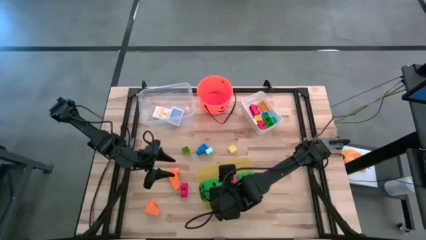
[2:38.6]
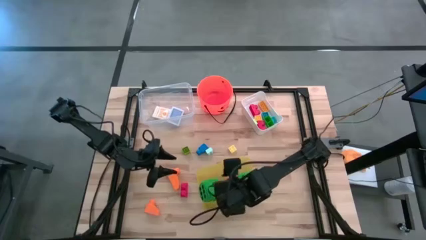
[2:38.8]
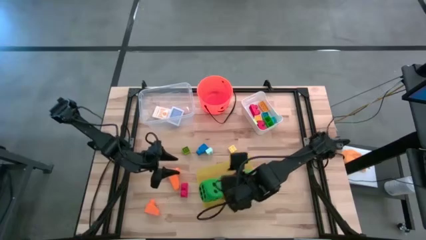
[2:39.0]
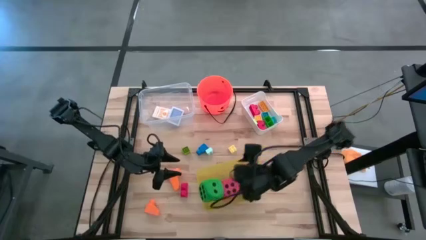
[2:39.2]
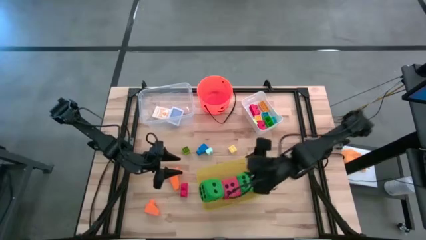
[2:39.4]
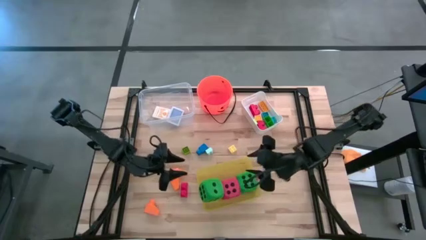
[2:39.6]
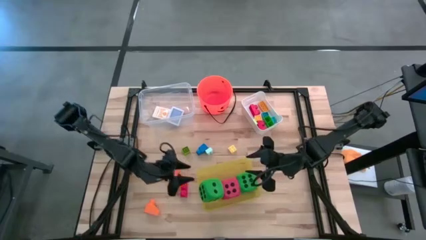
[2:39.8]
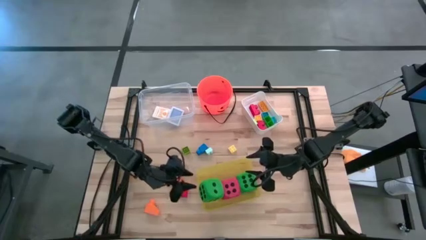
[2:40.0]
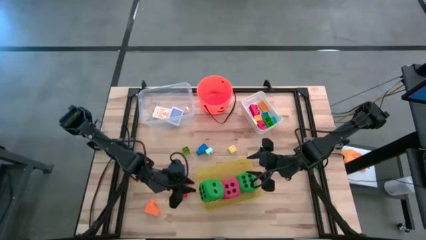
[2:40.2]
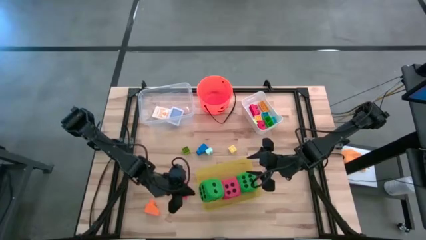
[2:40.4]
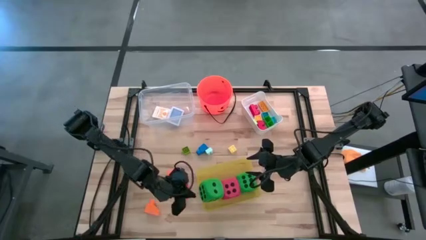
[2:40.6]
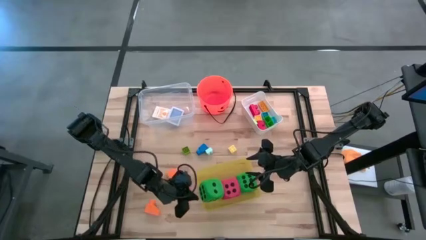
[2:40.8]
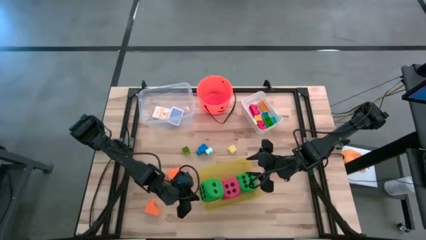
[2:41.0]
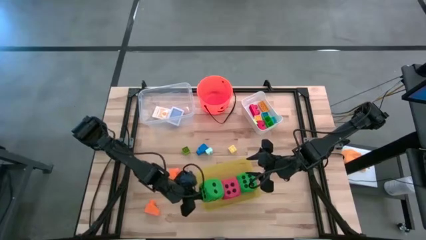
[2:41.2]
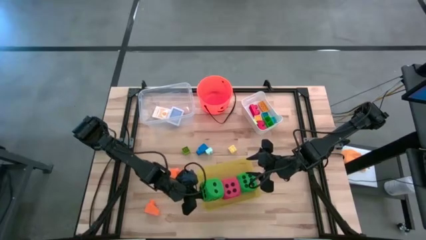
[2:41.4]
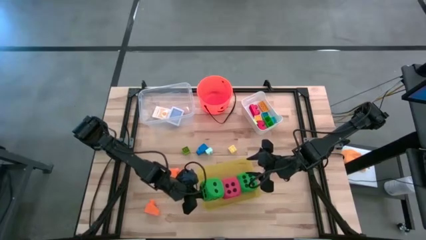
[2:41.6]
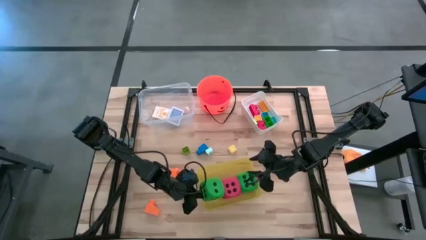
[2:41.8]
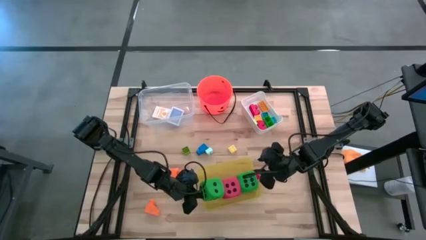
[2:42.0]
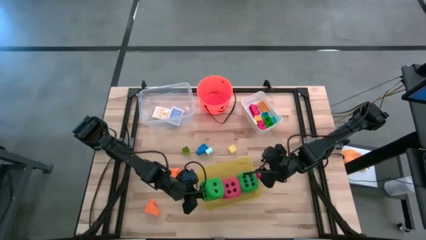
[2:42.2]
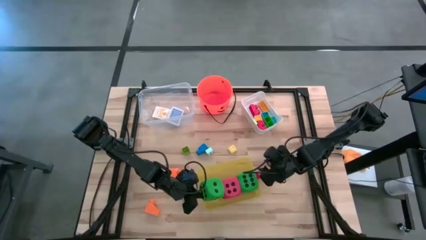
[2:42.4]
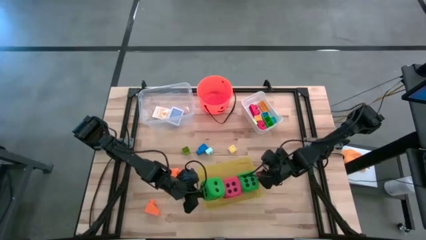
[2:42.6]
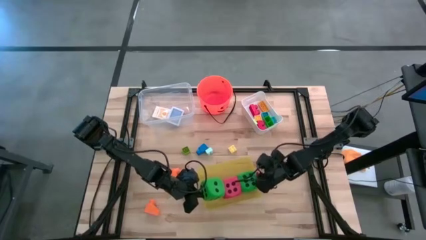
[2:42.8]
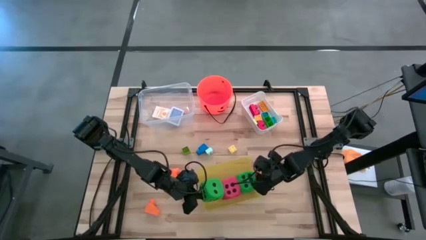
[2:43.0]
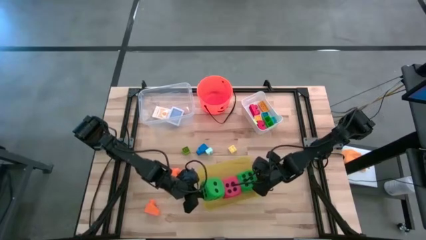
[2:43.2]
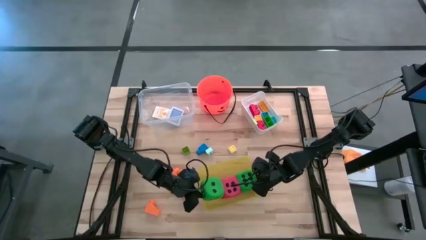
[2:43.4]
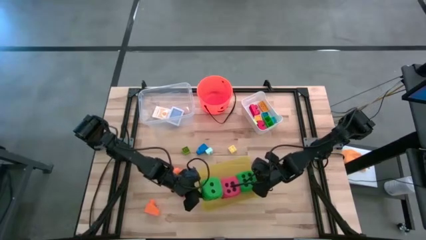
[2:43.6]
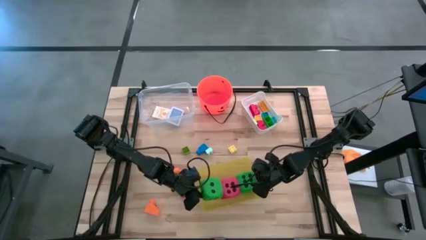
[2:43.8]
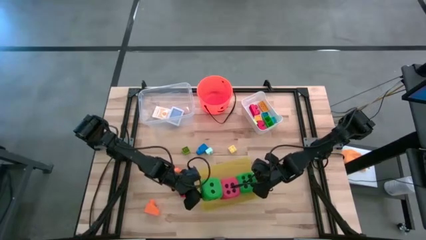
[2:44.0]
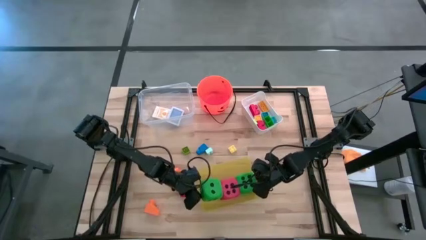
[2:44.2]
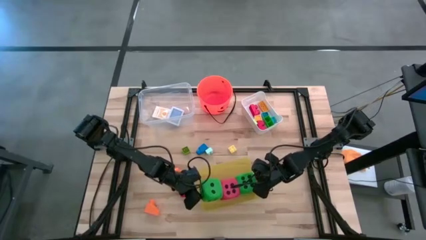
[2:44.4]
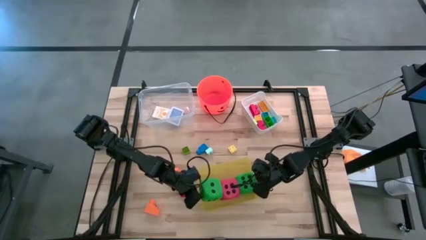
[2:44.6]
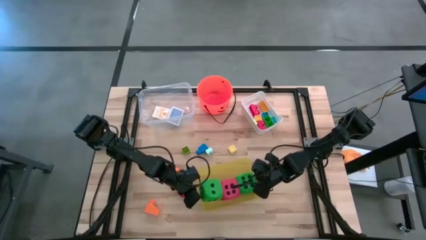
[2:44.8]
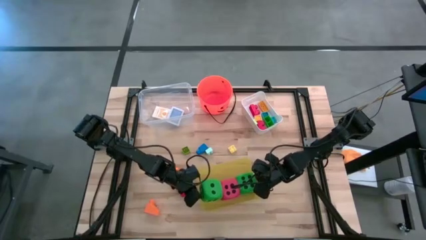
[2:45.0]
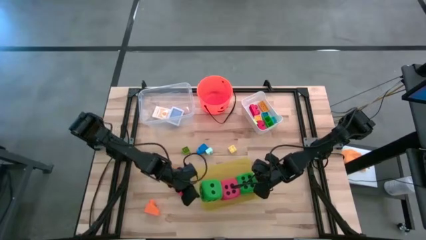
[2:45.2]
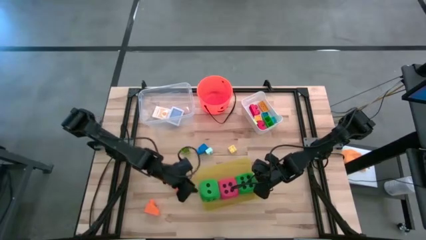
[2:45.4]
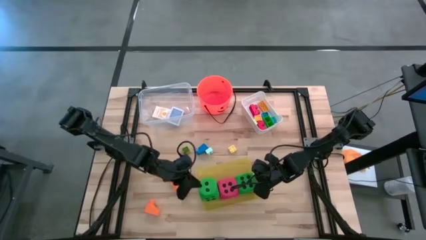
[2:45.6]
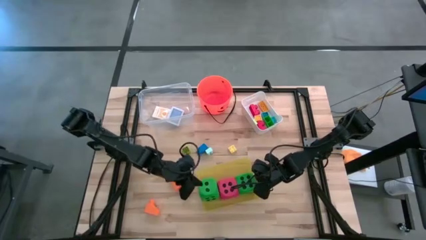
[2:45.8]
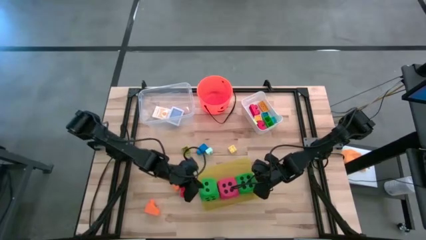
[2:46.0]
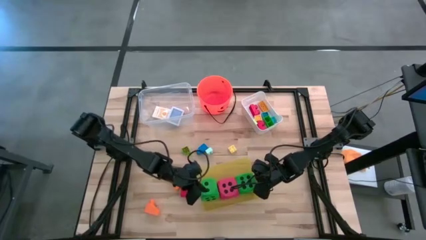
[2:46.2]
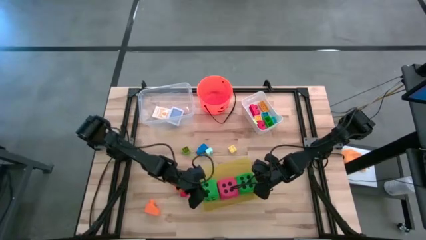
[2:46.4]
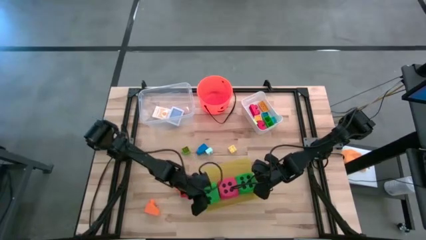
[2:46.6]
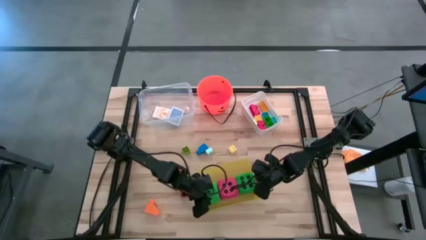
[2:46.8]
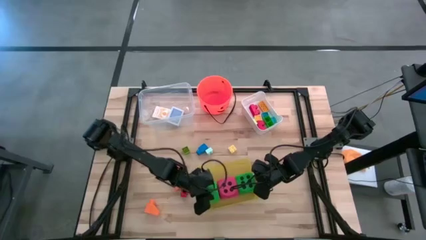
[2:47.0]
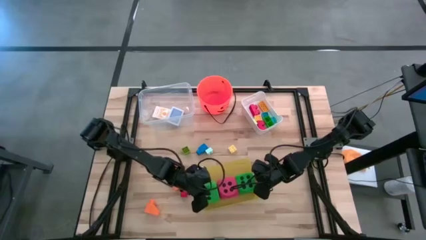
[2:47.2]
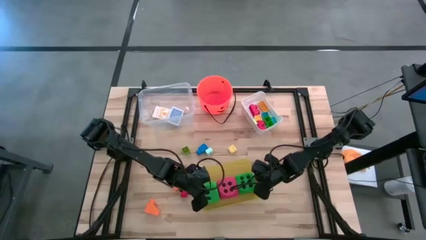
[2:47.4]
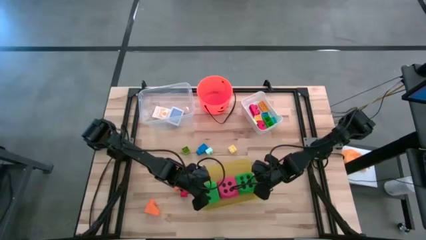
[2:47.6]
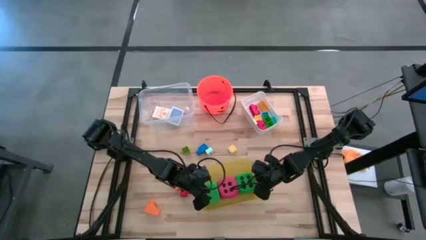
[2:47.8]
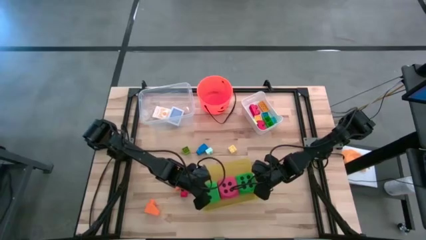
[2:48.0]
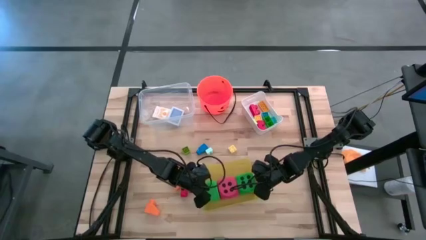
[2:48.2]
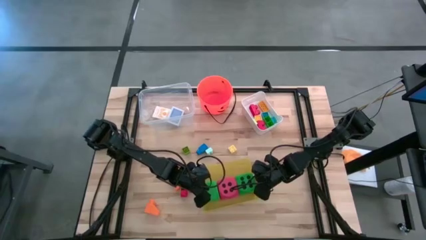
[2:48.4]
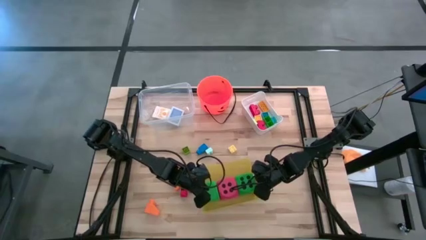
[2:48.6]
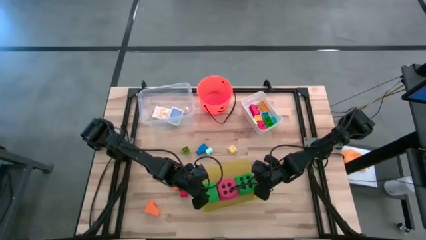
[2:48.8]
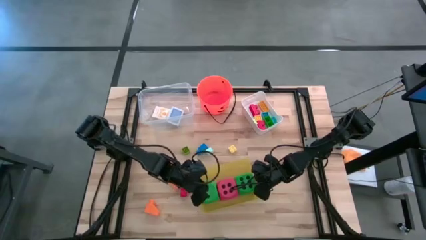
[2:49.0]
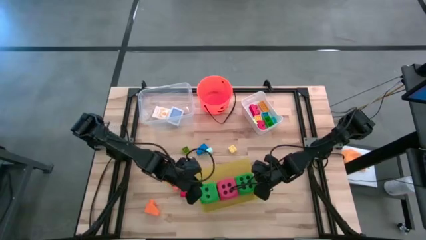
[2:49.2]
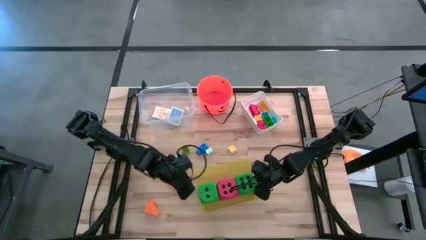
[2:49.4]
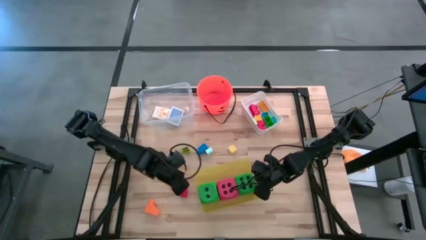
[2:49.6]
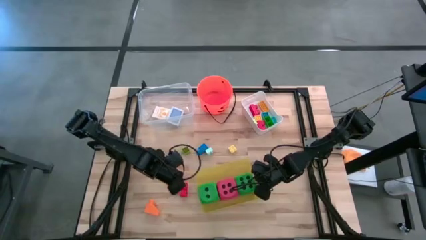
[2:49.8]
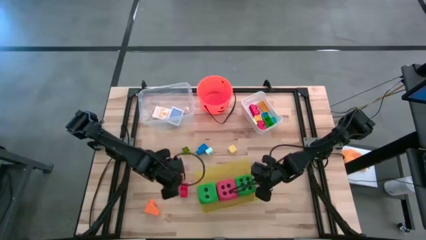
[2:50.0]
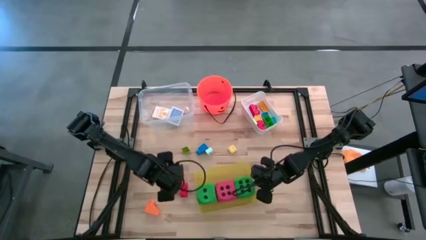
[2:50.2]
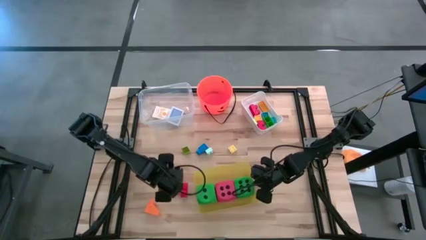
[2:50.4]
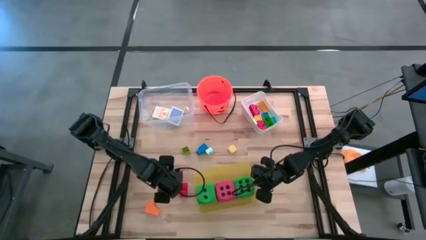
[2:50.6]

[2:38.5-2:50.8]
Task: Pick & Place Toys
Put the green die into the yellow bin

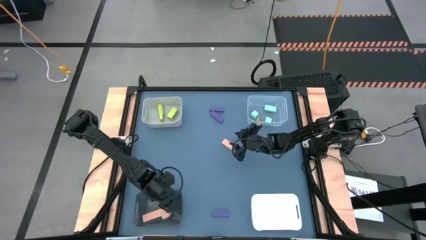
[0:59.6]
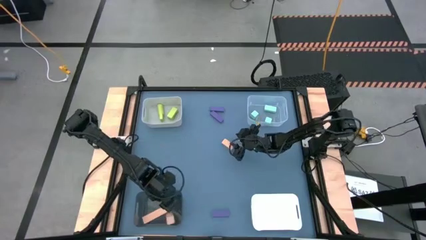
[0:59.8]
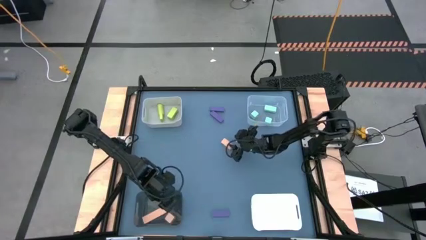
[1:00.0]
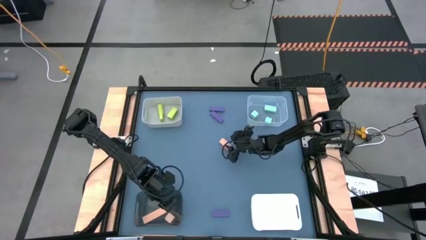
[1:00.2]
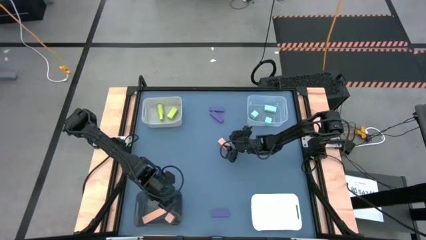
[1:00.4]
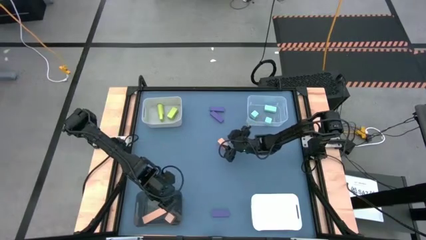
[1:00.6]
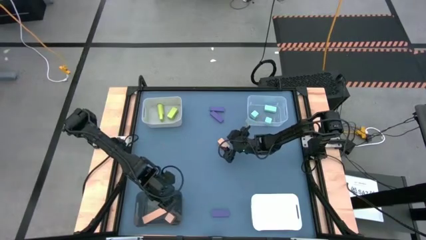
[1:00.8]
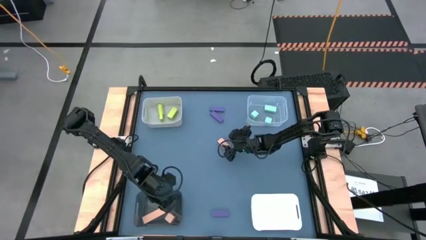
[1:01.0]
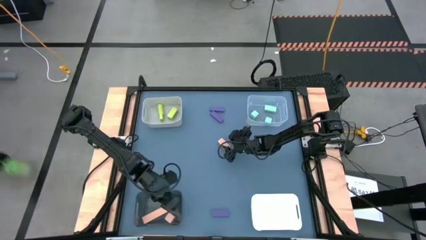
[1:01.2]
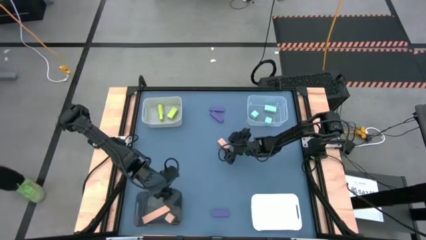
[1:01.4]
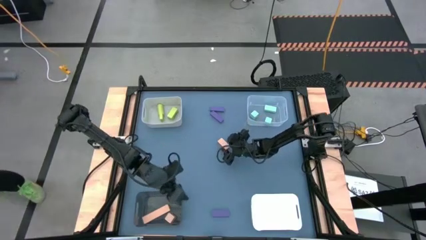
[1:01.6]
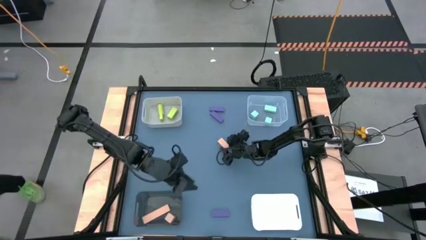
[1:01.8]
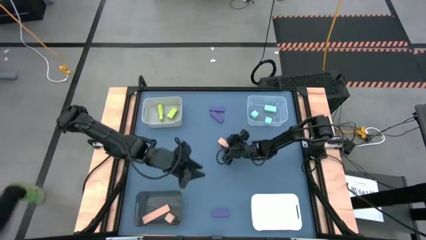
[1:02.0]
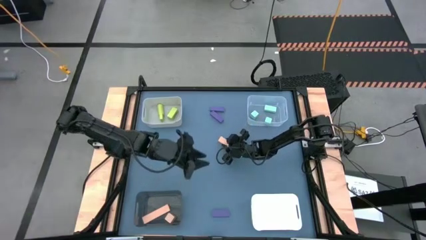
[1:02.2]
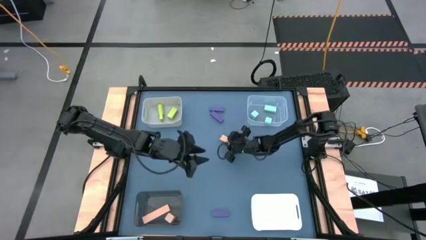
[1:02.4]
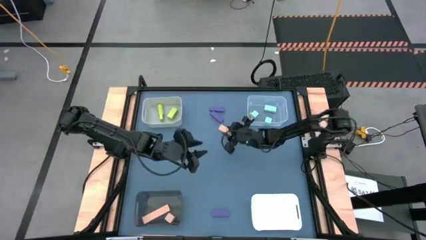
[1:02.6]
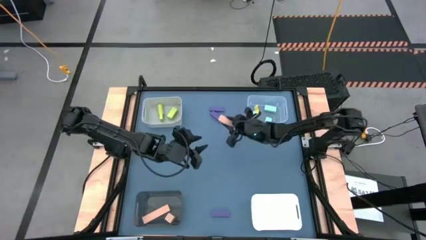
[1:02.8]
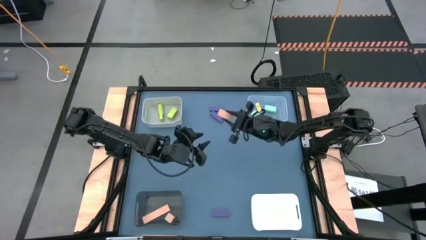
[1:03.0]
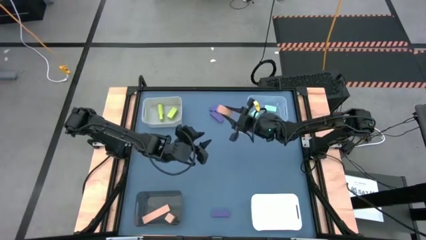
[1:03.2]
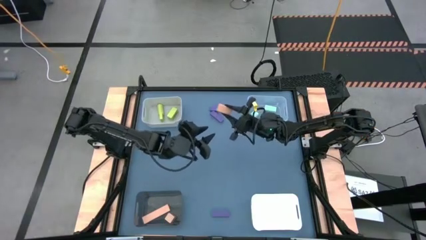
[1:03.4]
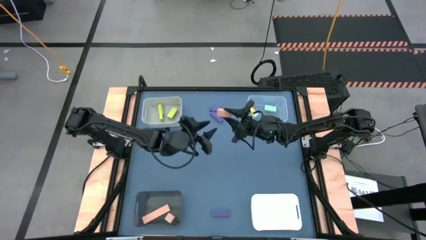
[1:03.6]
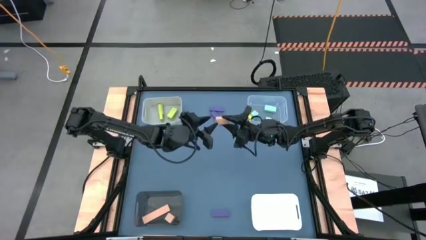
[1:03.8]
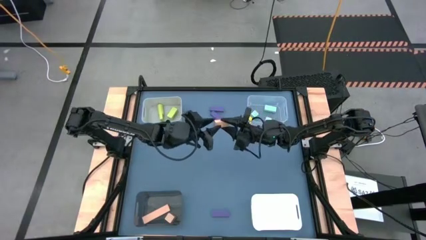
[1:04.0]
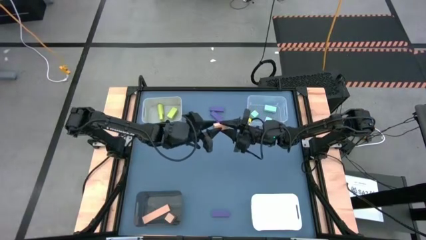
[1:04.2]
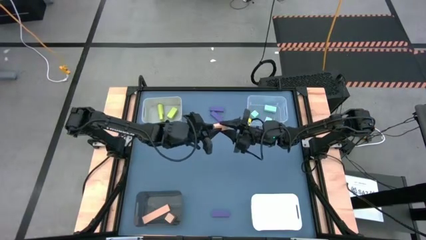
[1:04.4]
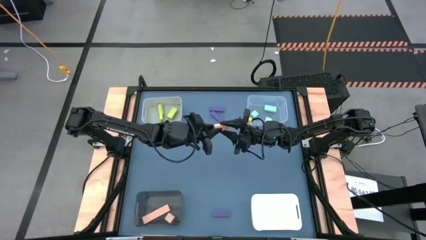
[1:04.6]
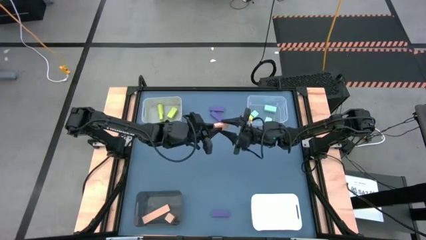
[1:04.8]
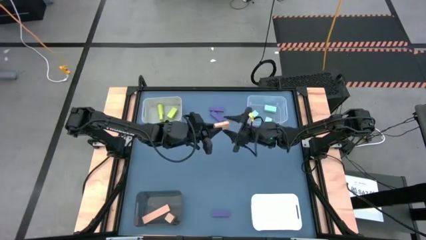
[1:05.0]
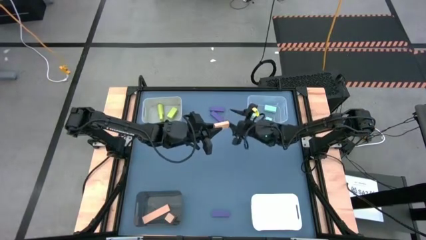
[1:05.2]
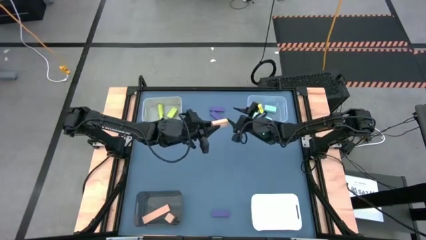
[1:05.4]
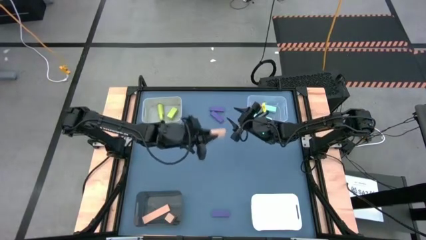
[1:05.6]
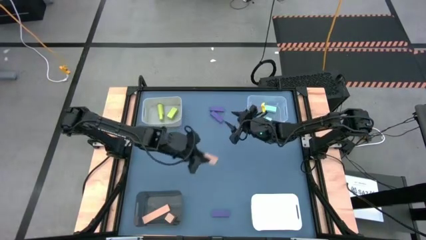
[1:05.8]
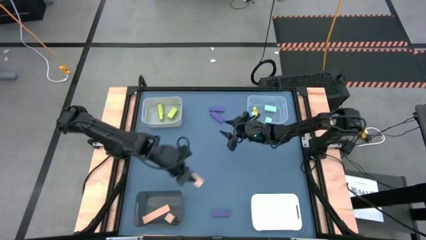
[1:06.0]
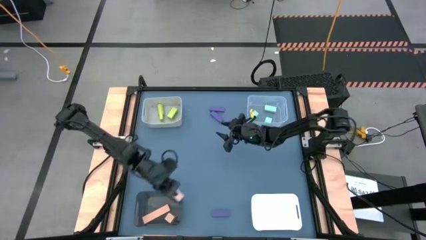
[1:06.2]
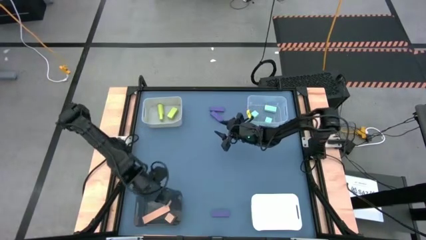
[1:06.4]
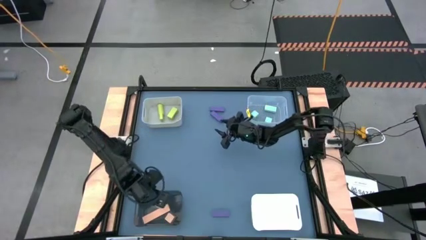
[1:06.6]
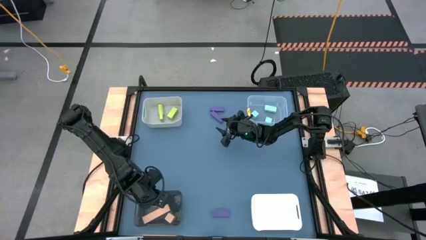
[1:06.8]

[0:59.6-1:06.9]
Task: Sort & place blocks by color
Put the orange block into the black bin
